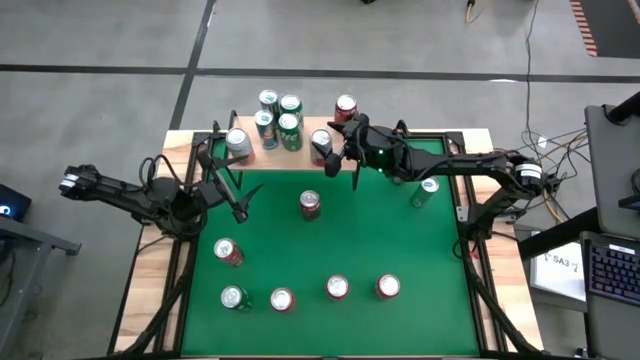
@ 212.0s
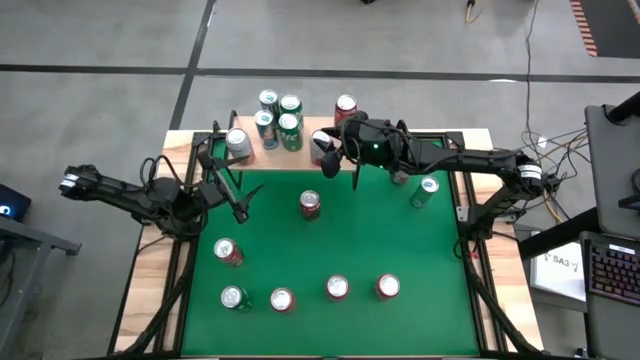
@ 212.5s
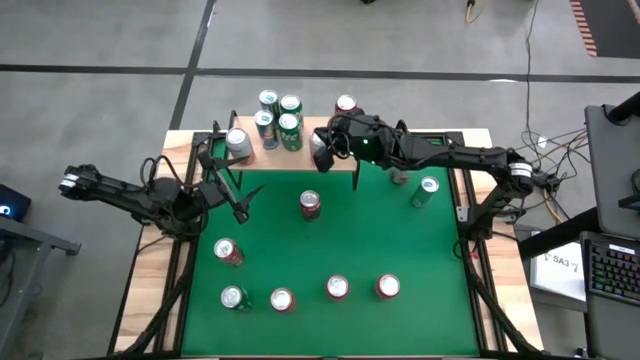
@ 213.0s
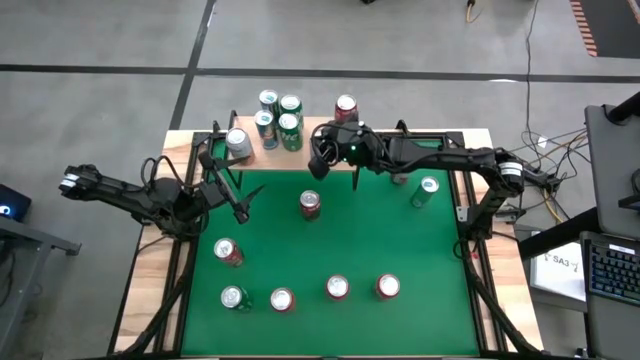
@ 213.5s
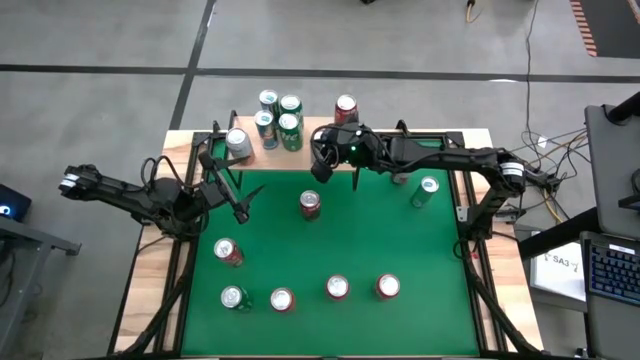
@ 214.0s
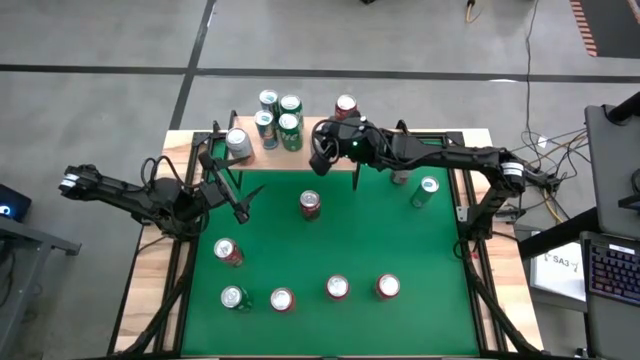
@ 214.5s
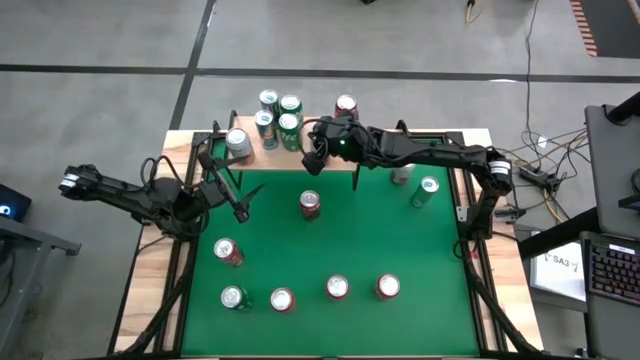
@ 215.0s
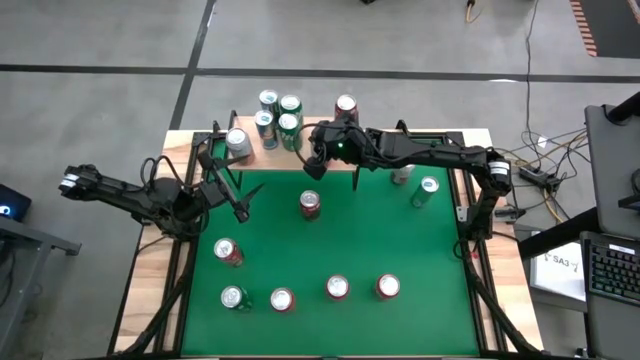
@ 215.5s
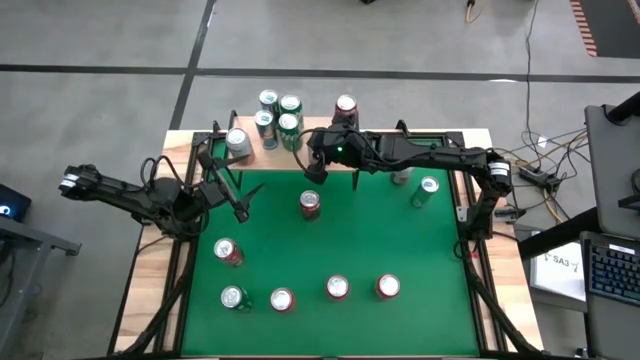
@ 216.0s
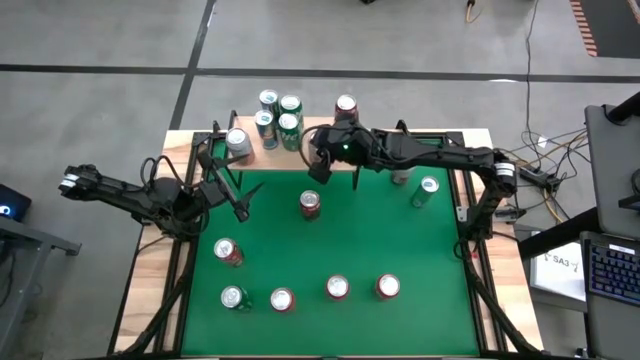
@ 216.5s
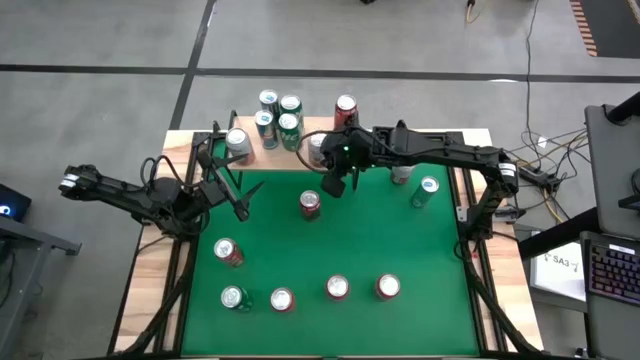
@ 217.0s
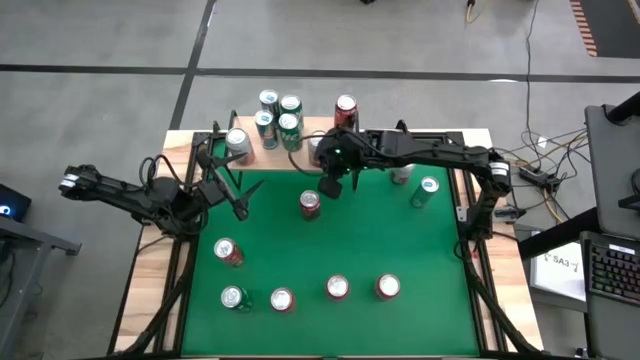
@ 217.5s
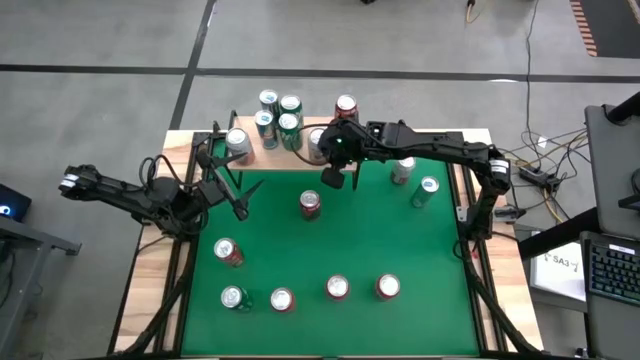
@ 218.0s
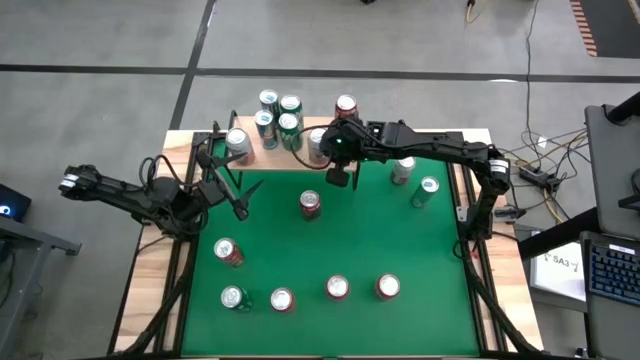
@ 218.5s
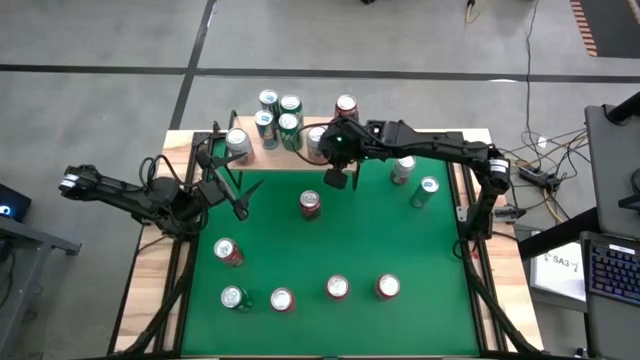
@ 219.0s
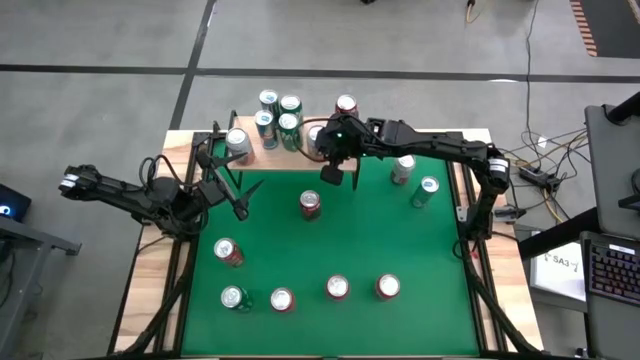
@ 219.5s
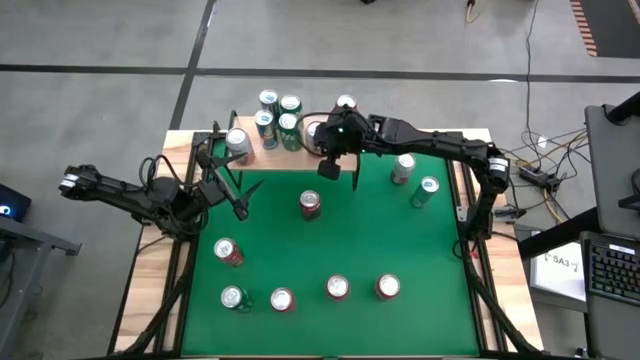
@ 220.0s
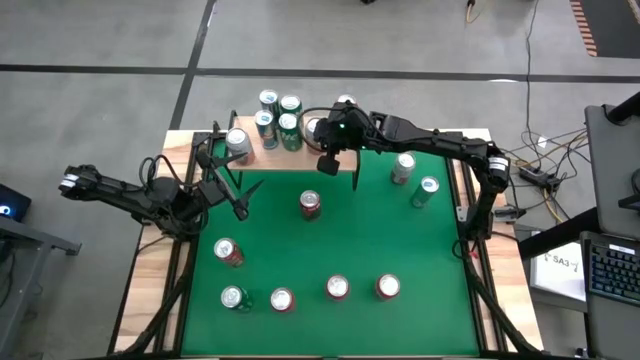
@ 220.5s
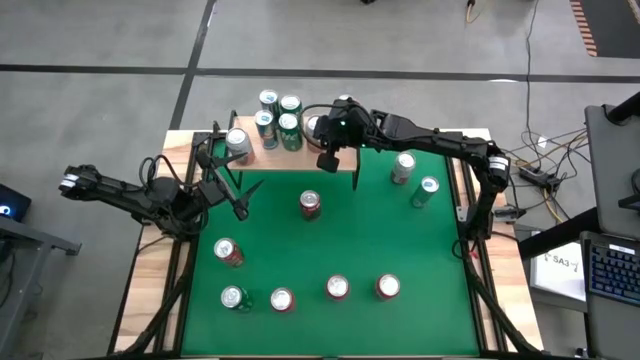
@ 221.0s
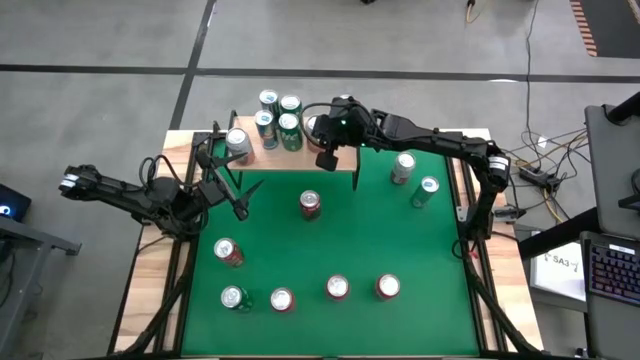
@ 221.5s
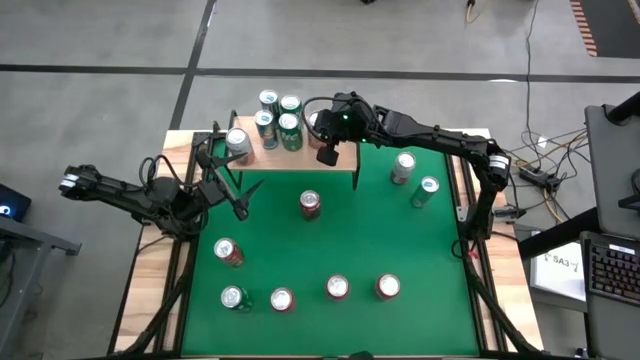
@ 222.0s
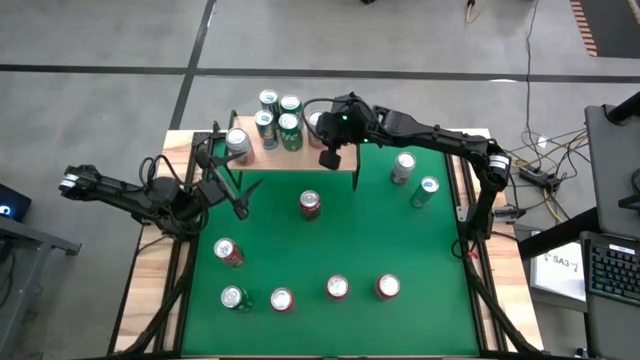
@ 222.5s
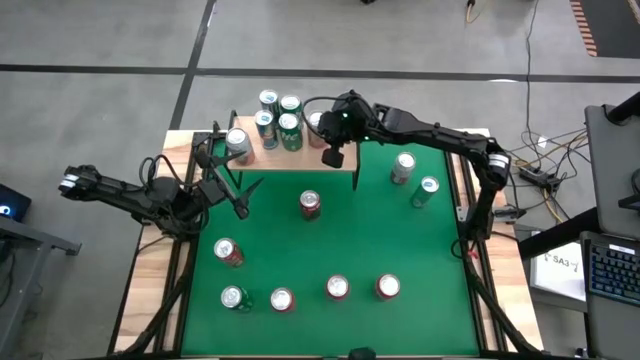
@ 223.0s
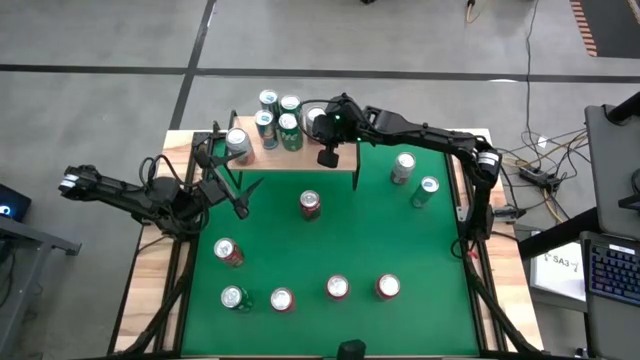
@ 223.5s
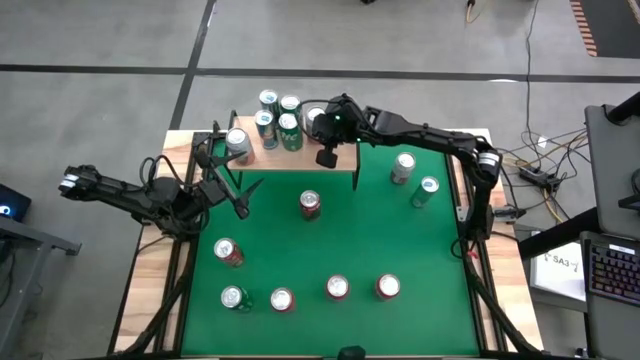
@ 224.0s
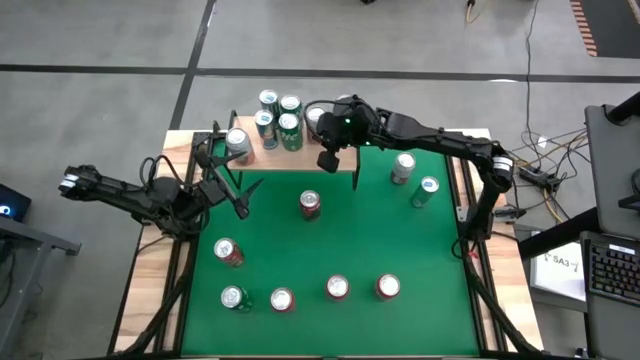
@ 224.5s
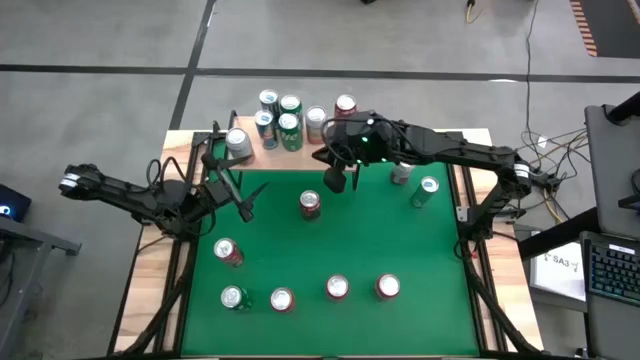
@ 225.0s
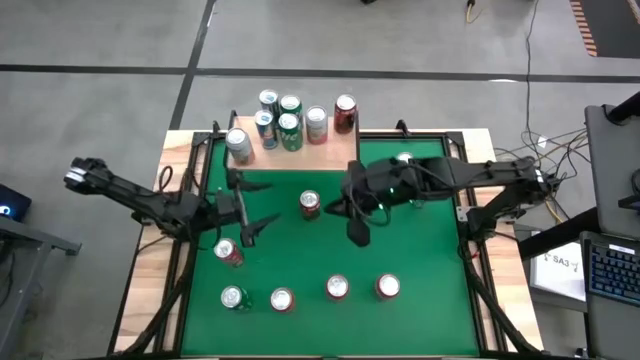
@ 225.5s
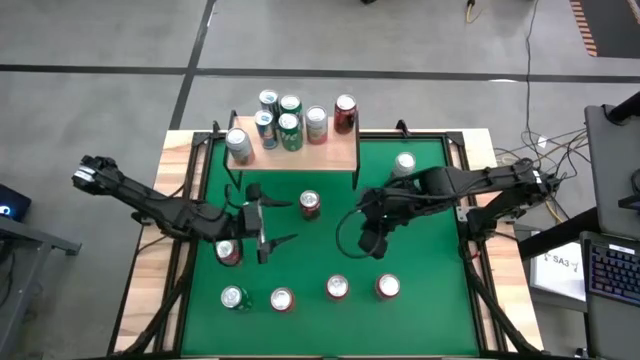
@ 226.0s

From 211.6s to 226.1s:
Task: Place canned beverage on shelf
Put the blue can on the shelf

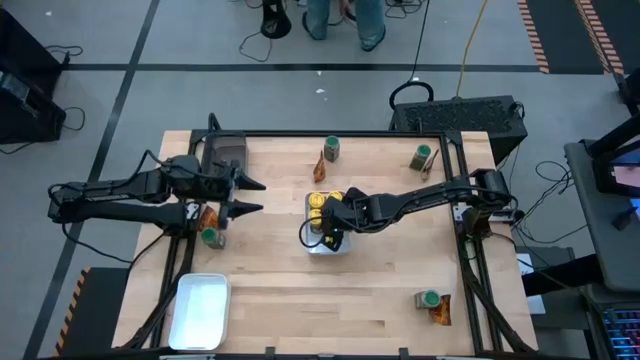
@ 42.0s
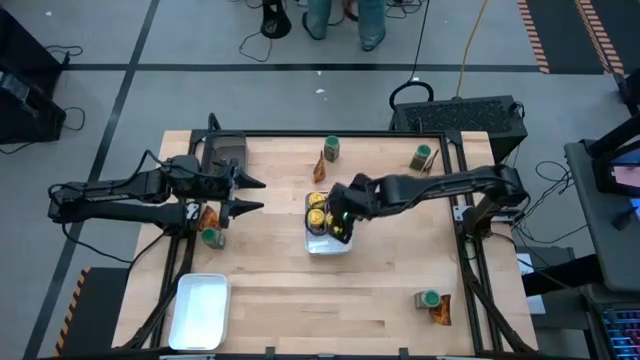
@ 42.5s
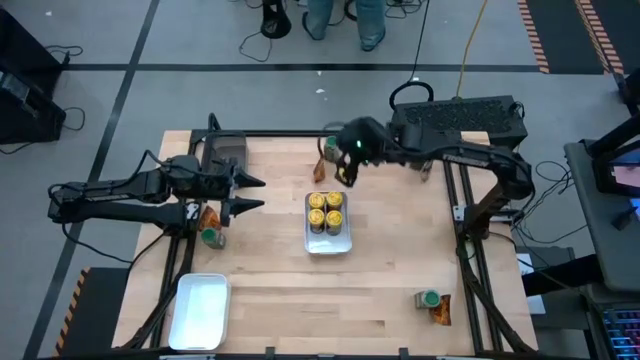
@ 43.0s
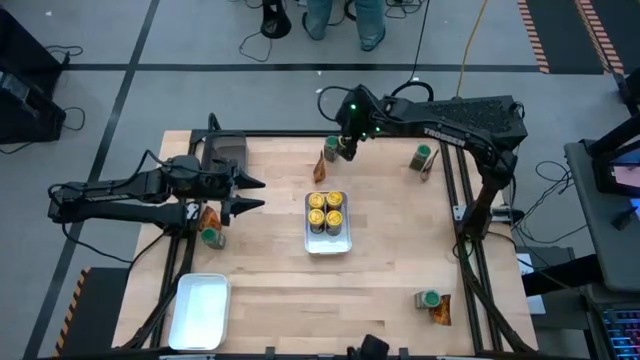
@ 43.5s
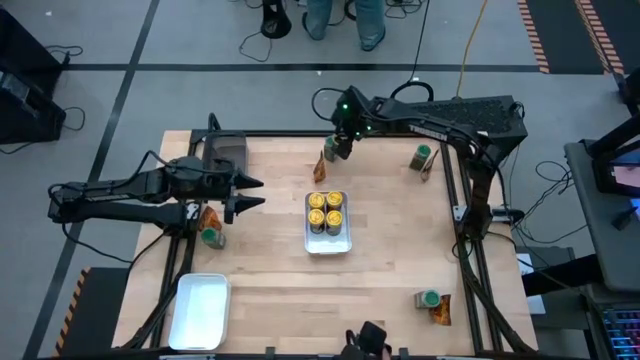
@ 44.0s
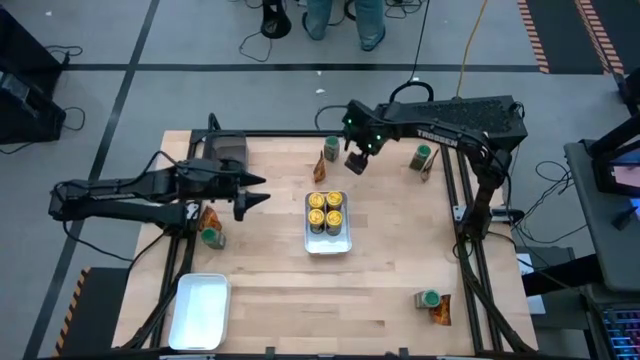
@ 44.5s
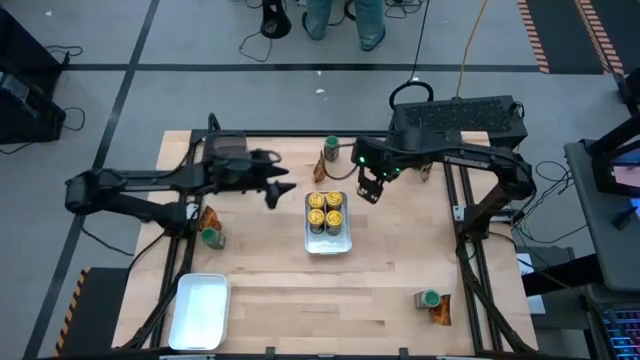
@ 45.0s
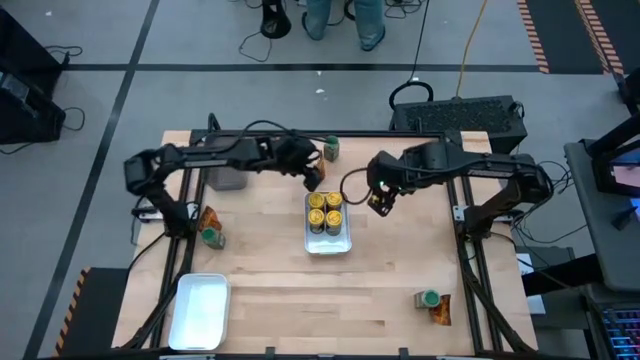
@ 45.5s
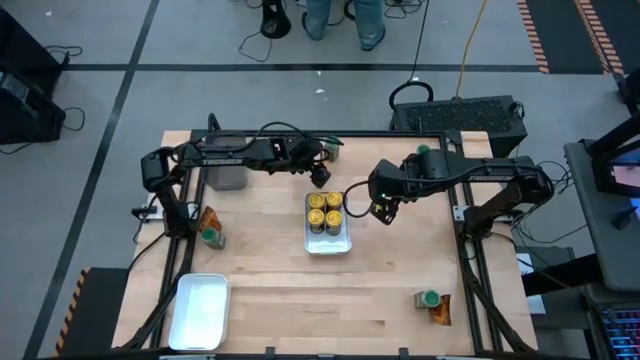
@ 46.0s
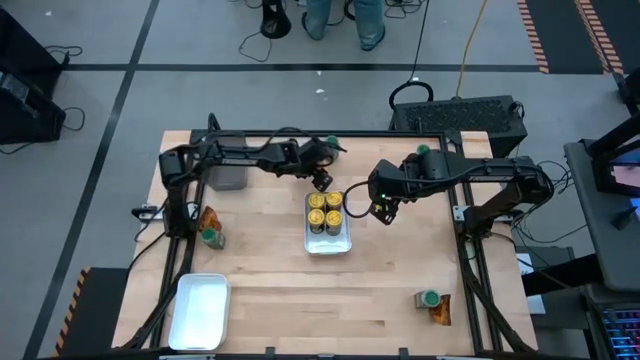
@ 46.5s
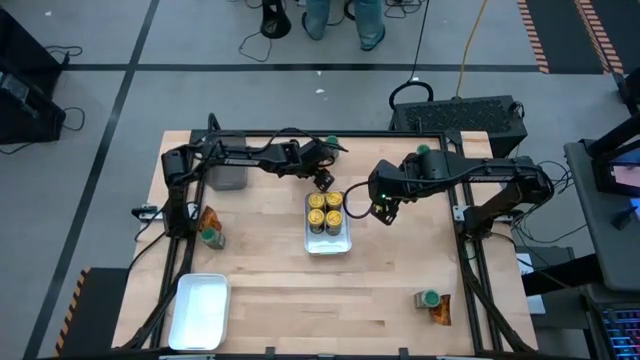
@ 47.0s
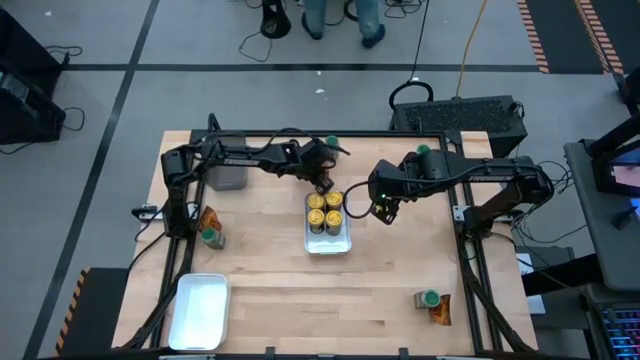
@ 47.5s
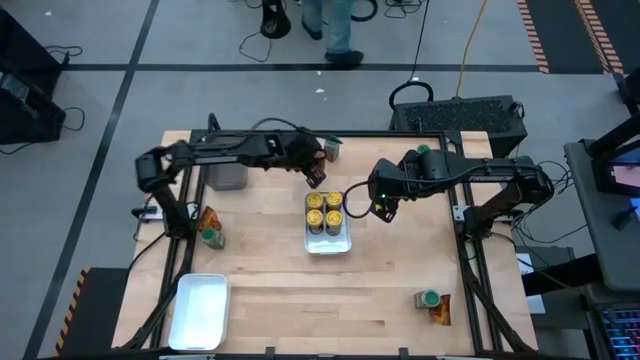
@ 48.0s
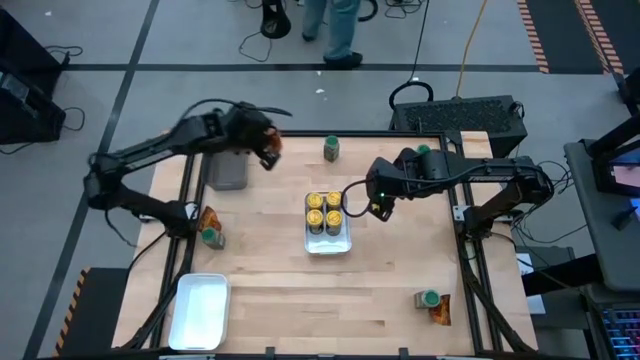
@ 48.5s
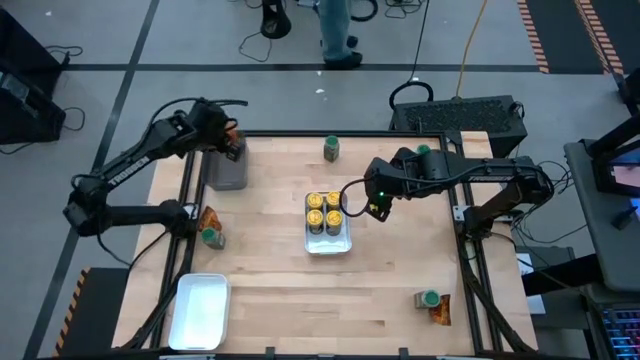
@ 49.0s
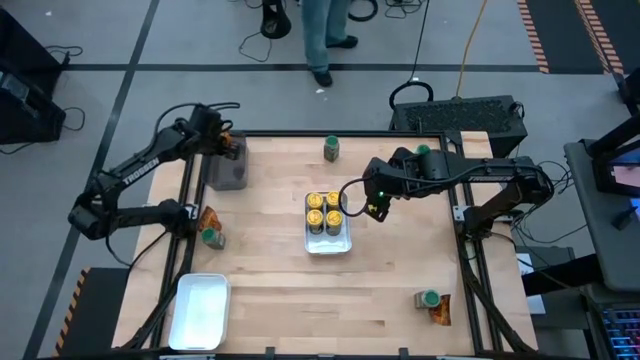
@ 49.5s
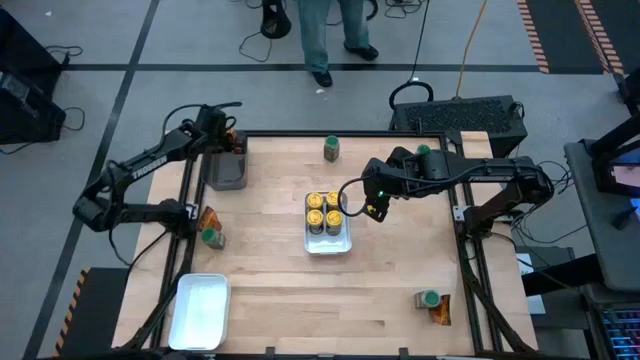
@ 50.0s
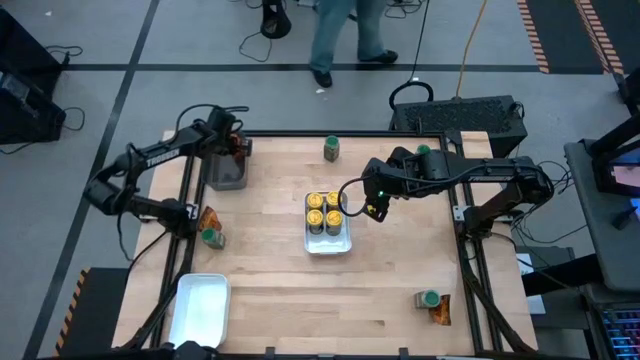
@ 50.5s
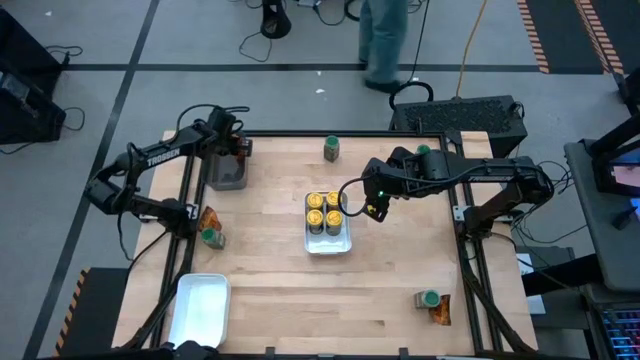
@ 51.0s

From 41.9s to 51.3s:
Task: Sort spices by type
Put the top center brown spice pouch into the black transparent bin
